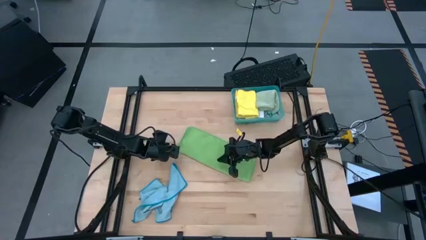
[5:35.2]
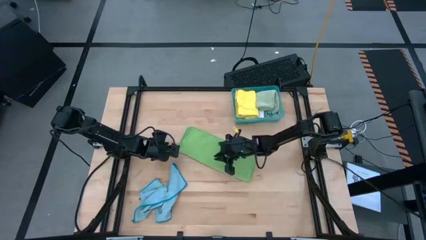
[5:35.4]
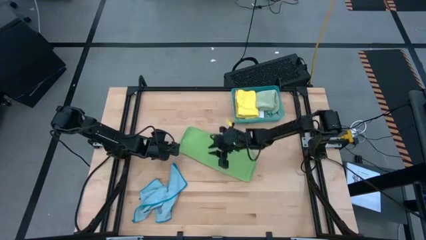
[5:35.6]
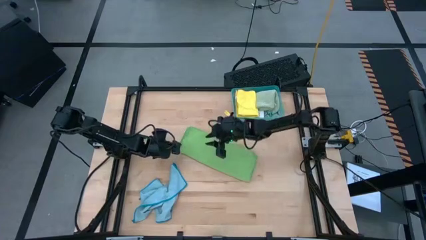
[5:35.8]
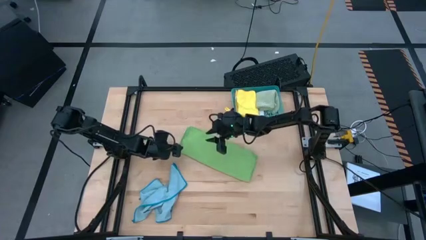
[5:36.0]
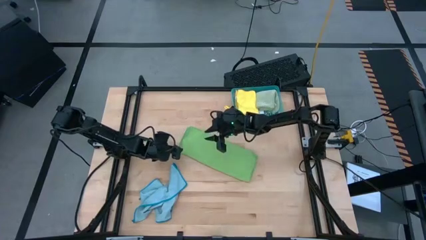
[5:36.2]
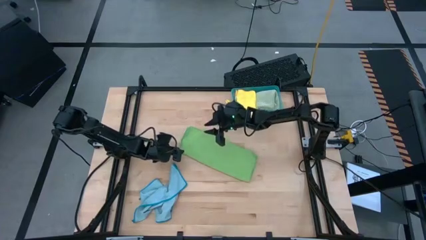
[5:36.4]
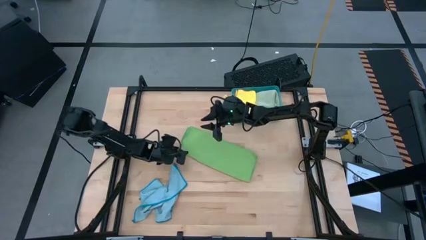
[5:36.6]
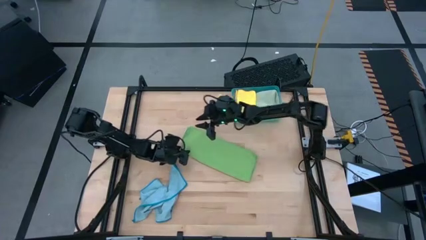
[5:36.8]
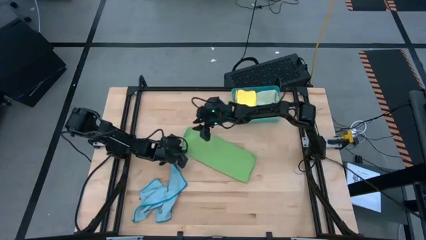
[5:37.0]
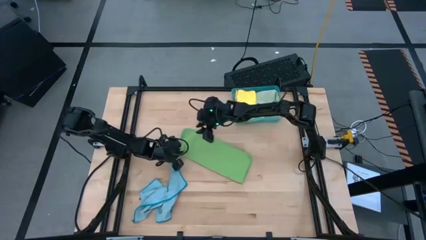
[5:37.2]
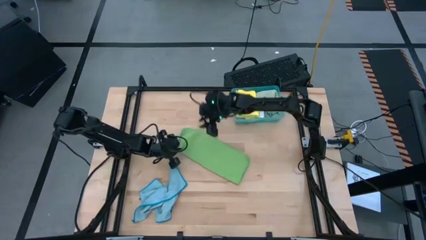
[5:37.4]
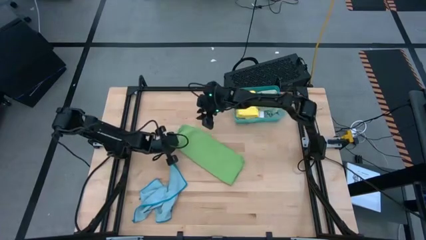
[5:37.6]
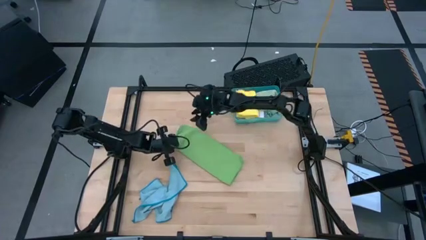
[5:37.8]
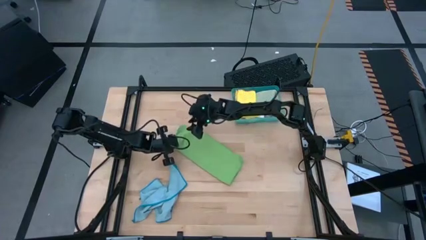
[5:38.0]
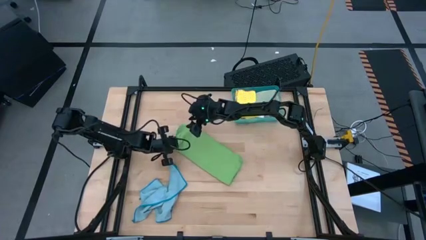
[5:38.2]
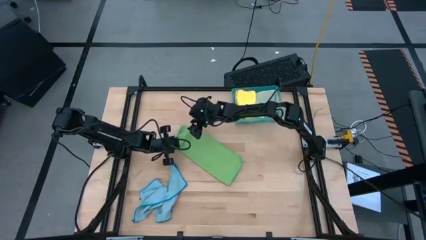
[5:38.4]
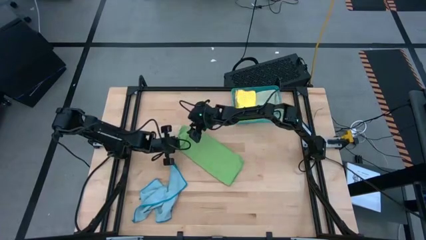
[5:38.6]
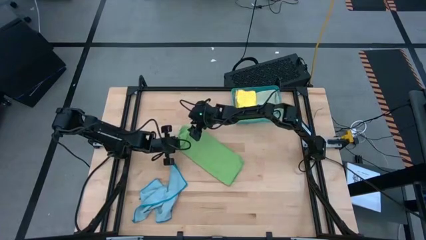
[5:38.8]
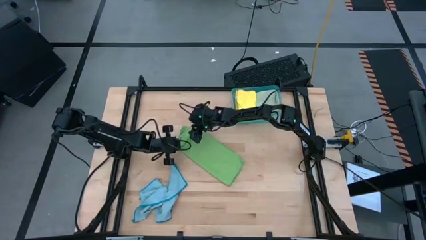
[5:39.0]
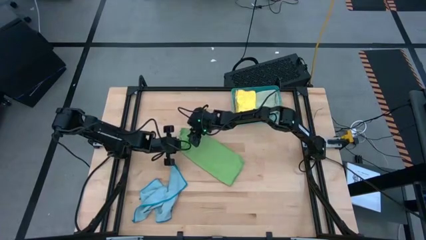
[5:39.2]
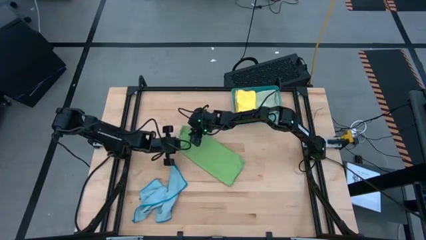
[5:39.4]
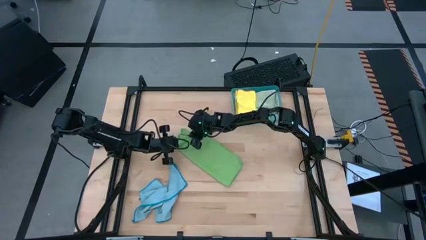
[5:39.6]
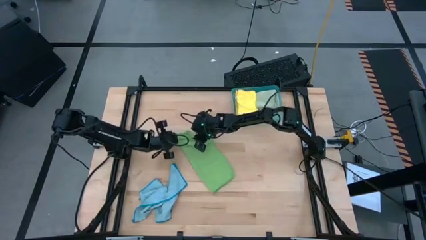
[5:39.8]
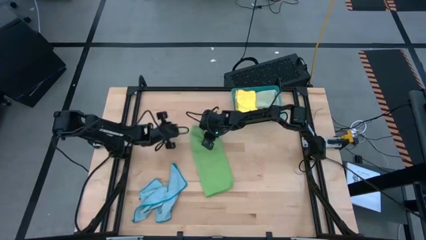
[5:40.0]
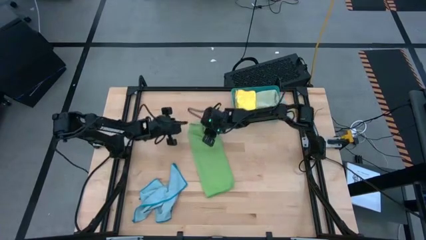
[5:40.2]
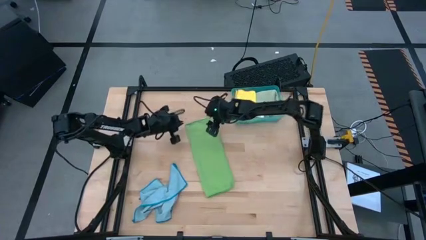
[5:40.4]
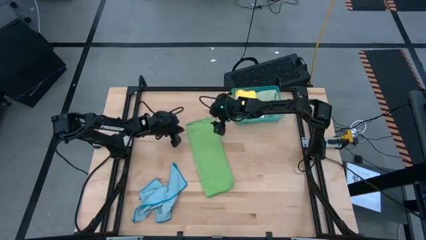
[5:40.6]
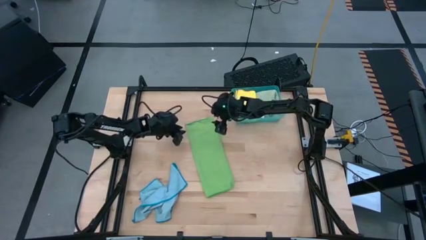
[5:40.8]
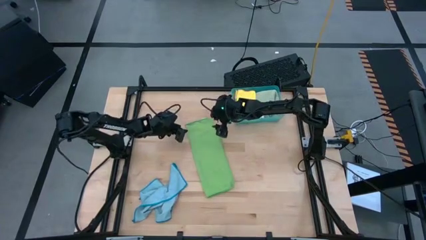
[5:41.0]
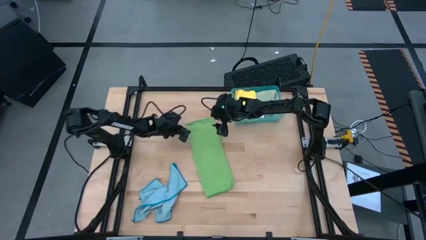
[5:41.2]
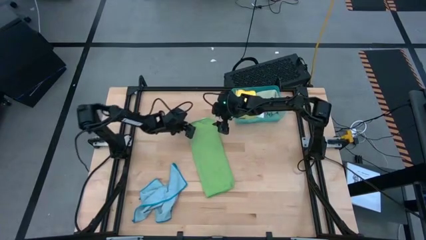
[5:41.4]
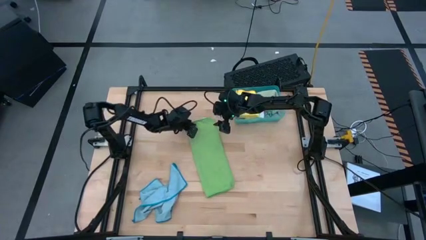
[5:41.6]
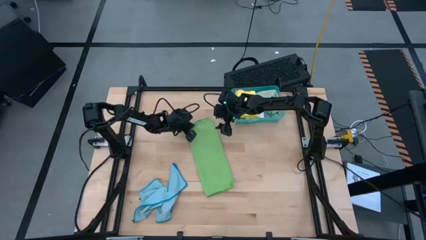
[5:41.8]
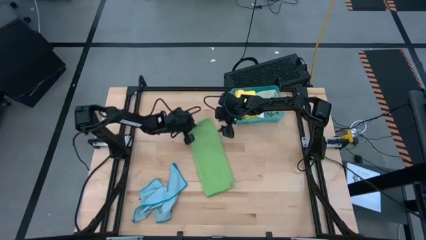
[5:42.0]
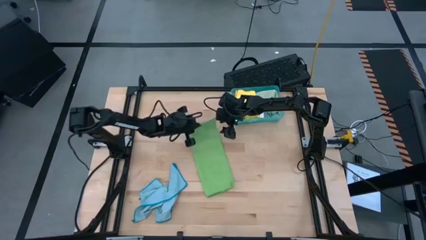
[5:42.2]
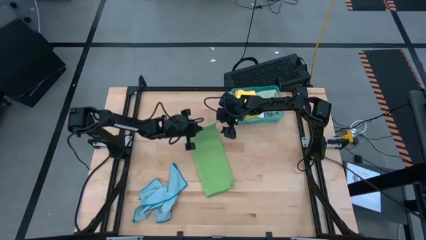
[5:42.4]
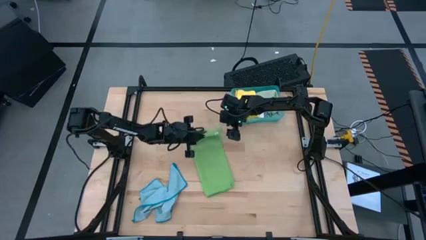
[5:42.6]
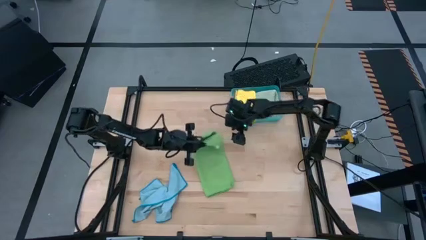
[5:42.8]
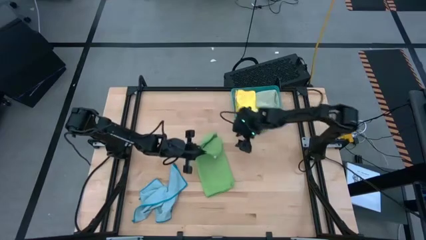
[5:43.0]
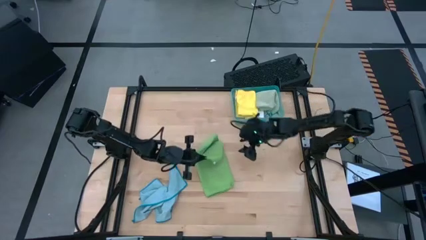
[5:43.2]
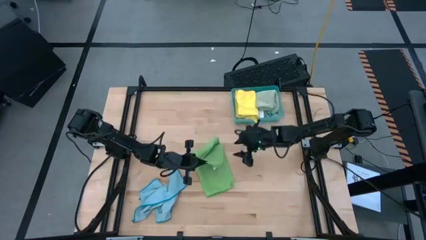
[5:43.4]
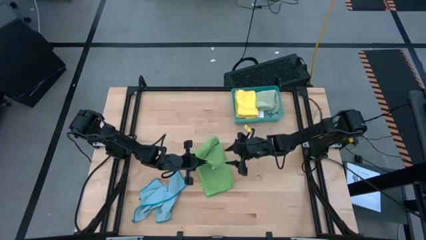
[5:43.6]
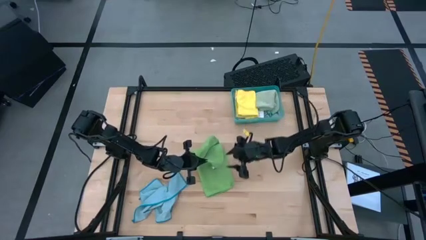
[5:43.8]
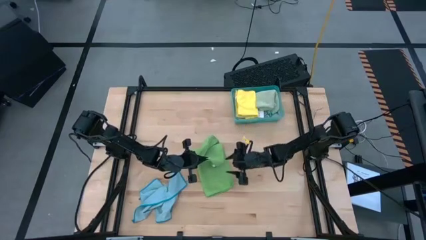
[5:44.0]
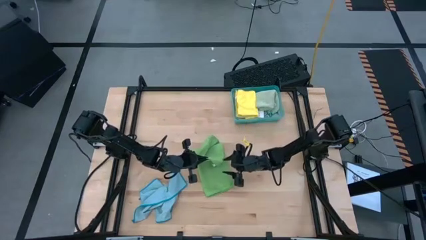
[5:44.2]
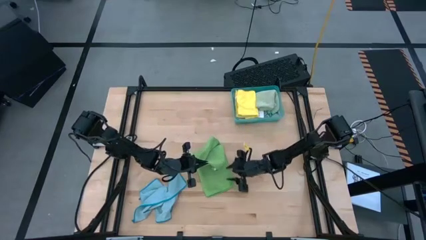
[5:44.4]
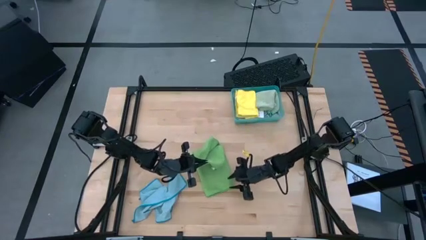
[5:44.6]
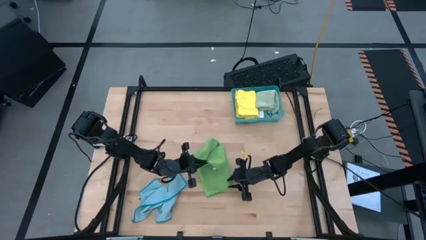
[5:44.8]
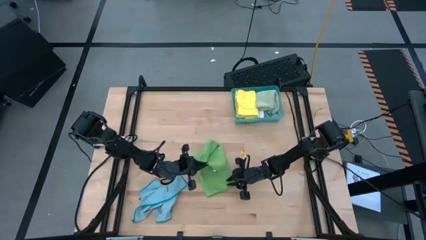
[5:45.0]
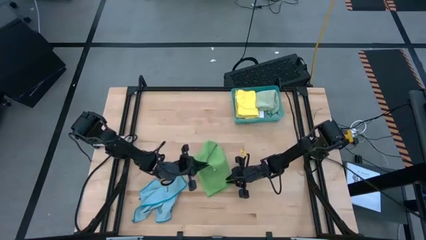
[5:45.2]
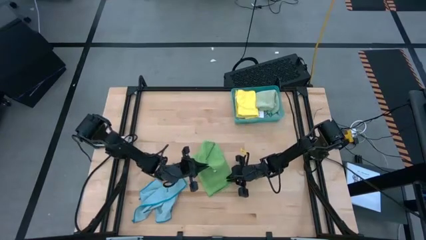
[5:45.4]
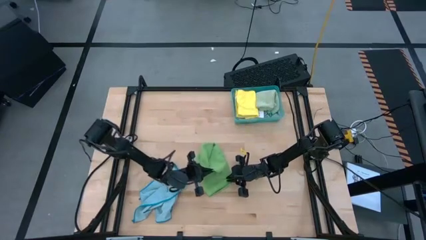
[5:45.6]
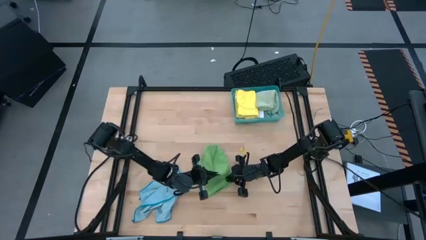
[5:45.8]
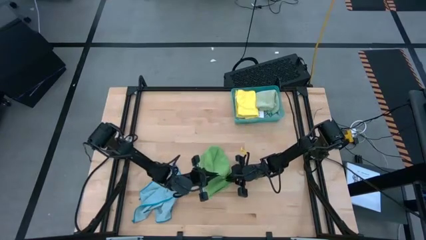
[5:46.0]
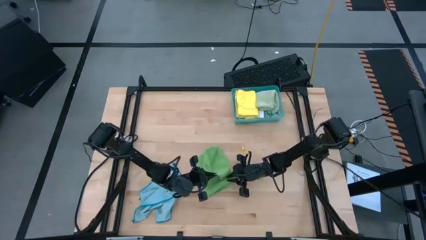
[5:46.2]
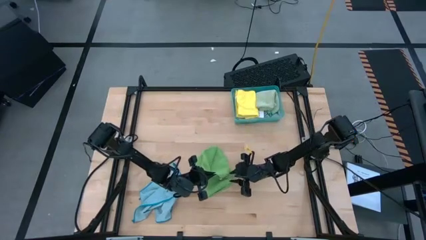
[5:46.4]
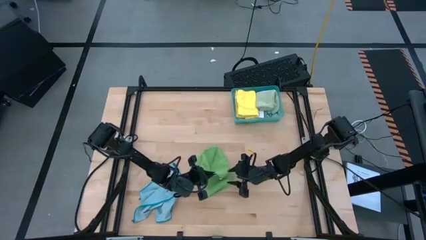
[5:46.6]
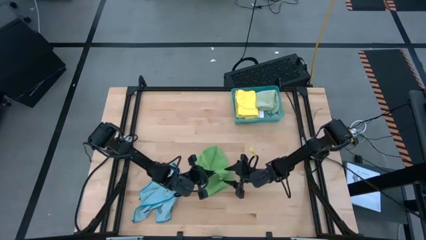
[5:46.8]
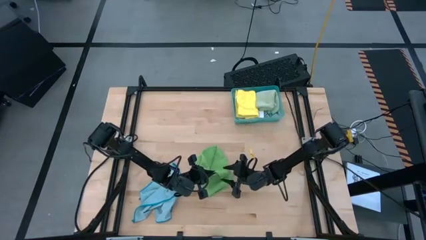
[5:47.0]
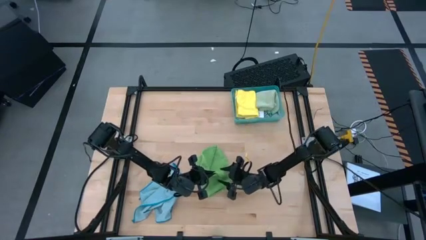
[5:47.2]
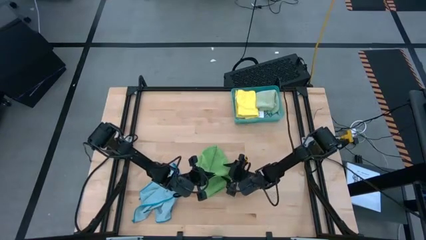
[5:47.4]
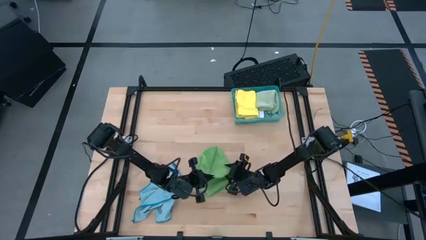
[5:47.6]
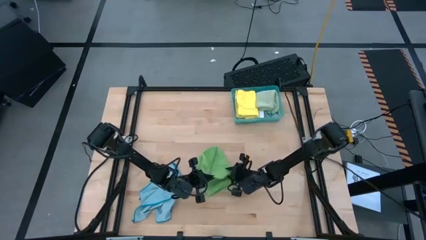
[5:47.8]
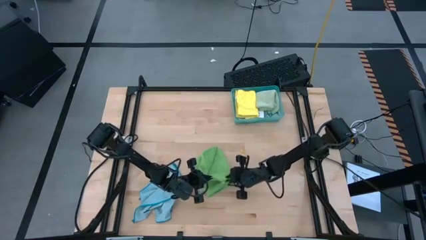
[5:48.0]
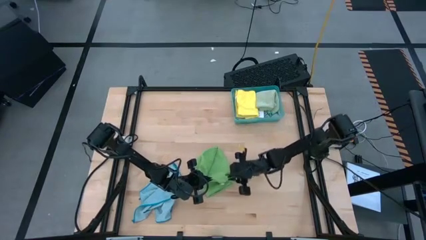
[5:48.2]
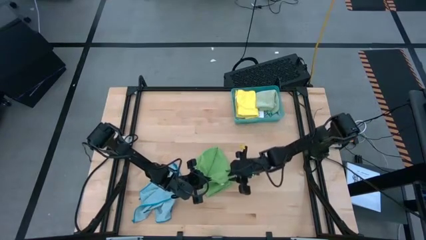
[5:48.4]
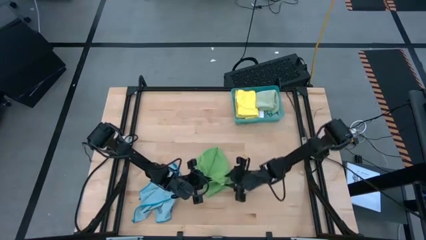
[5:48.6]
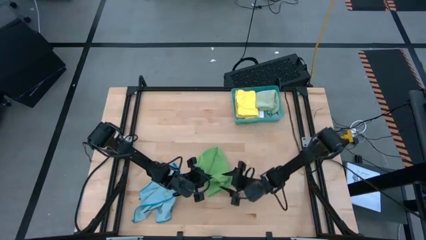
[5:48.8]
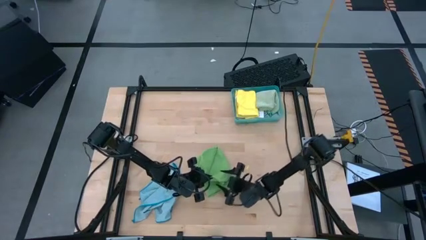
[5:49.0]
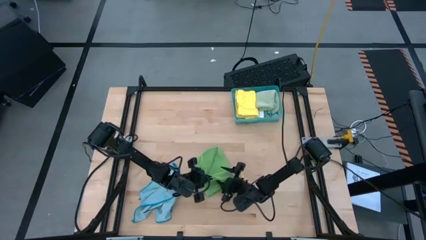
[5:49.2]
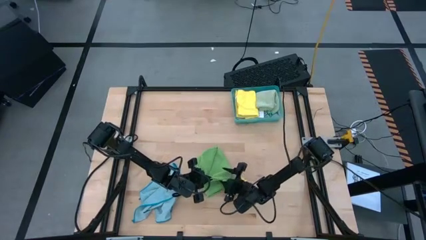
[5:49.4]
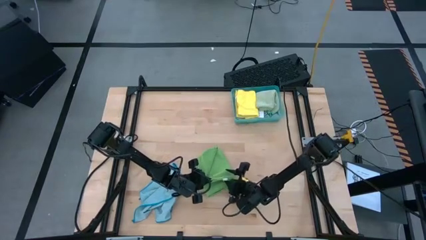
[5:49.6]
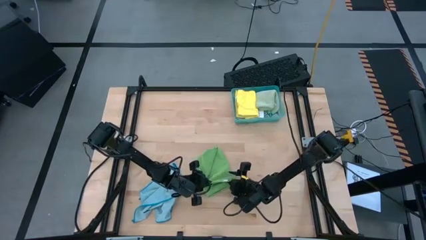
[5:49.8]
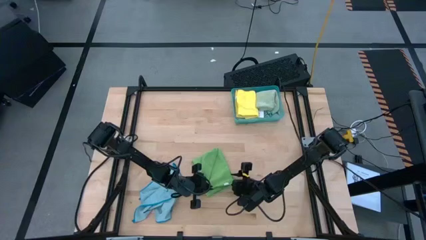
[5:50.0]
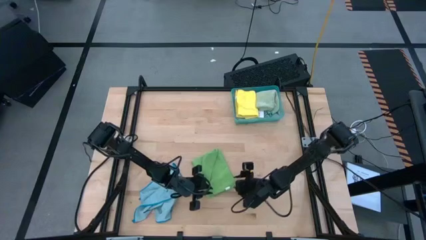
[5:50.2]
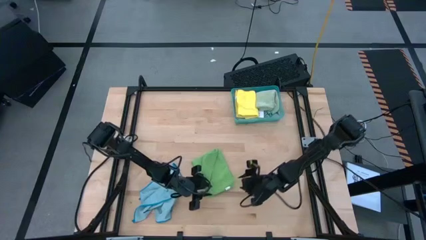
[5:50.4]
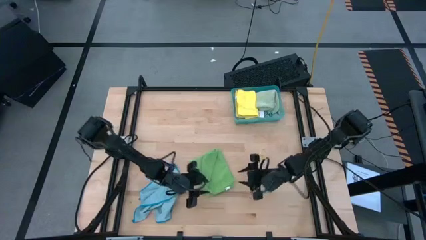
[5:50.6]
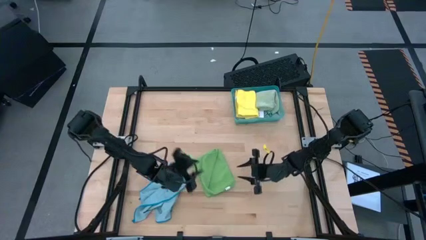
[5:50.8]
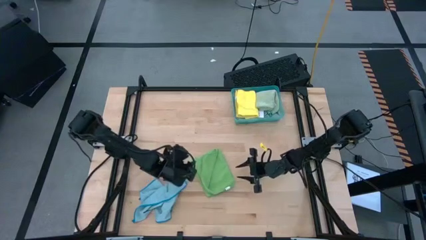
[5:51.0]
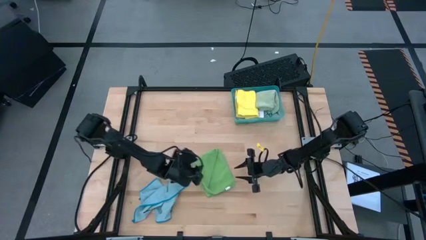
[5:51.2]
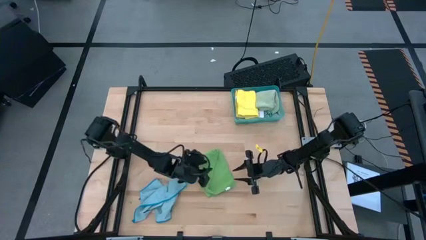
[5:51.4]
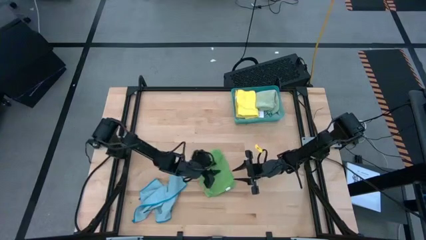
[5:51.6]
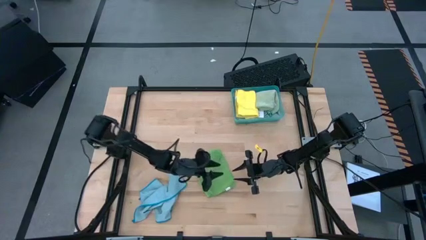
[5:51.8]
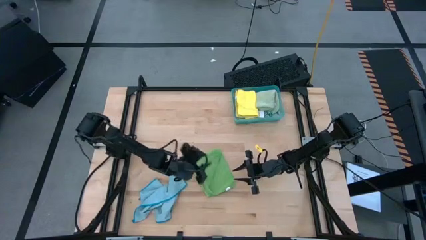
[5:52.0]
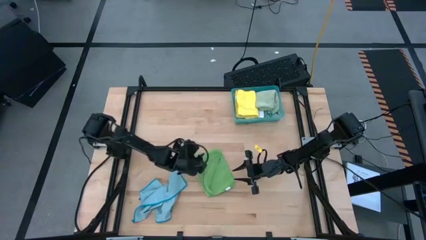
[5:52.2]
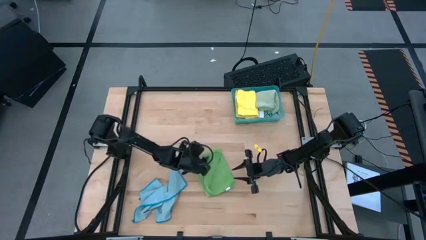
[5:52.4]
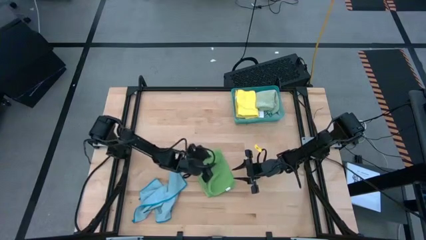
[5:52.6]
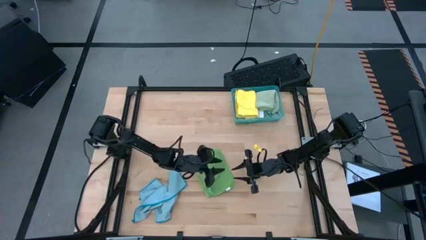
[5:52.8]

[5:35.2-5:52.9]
Task: Fold microfiber towels
Fold the green microfiber cloth
